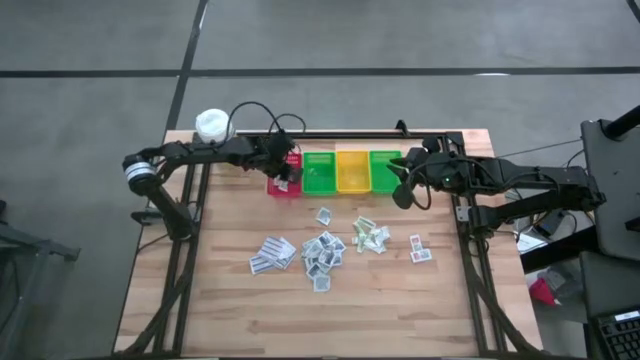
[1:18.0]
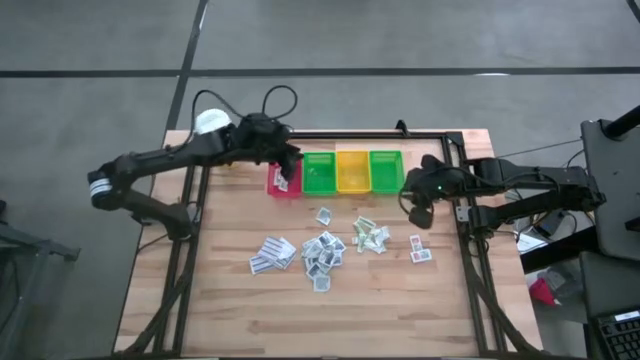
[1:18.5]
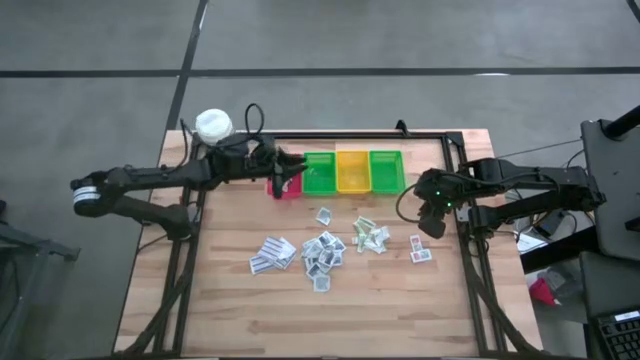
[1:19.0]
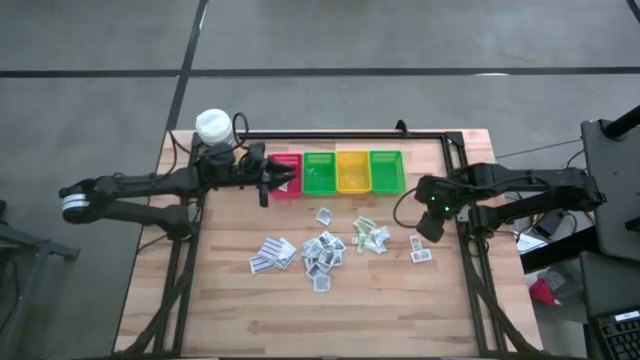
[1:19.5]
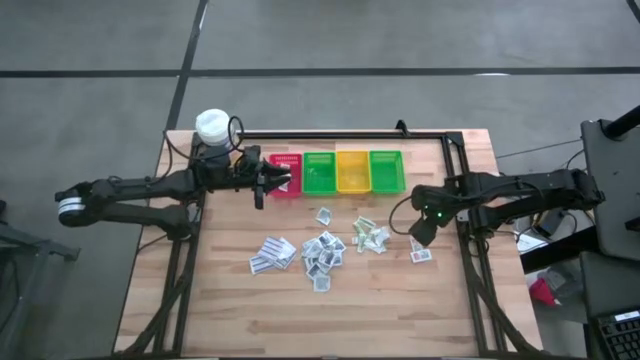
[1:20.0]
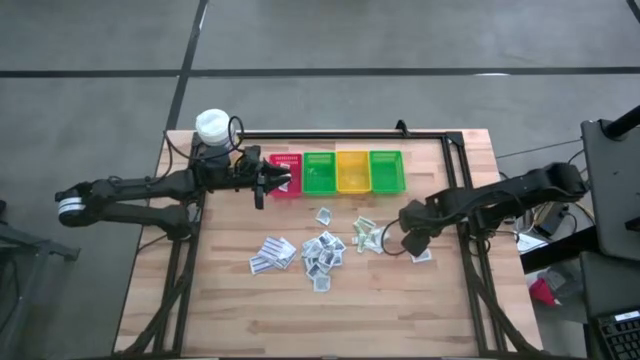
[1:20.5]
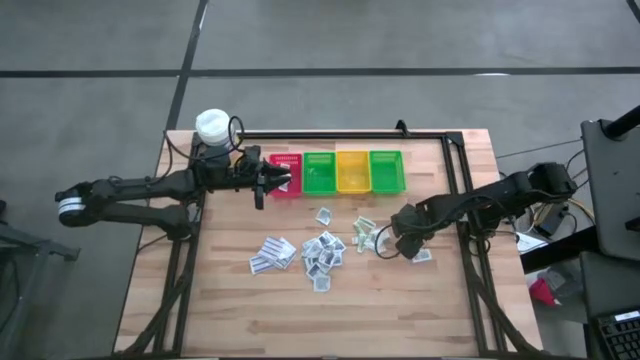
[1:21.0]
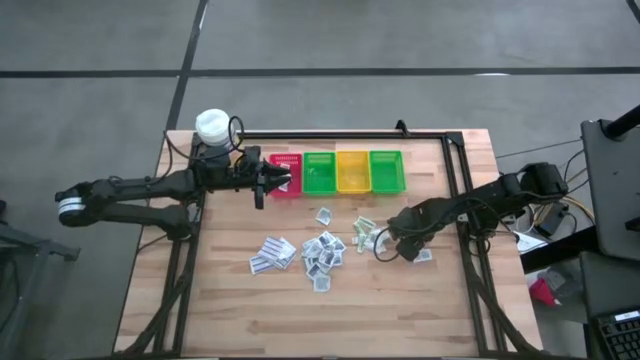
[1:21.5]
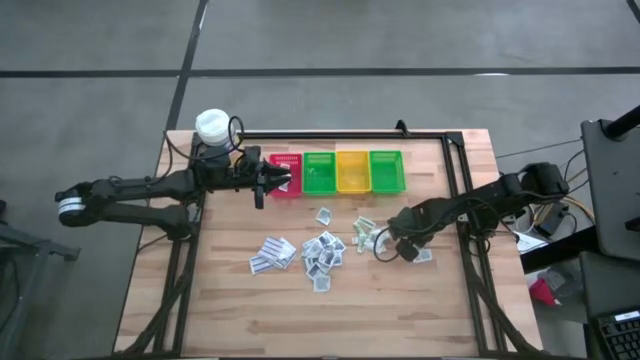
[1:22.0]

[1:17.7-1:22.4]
Task: Pick & Place First Aid Supplies
Put the ointment pack into the red bin

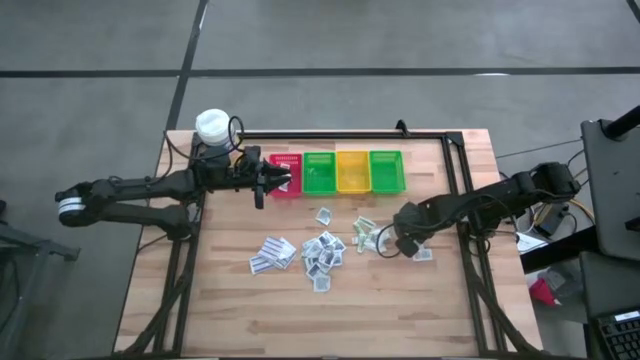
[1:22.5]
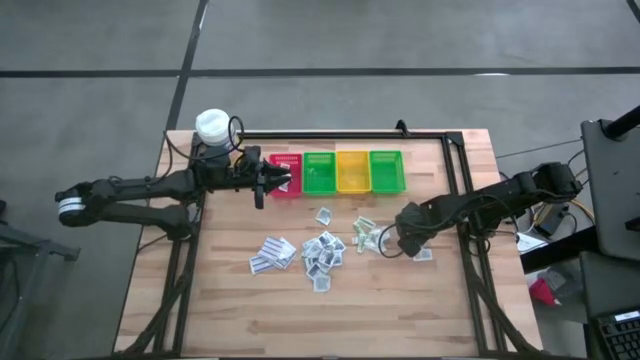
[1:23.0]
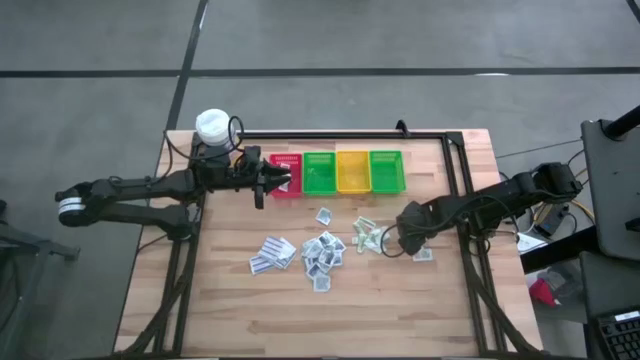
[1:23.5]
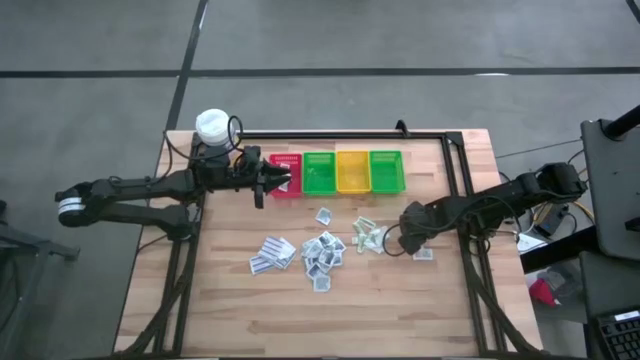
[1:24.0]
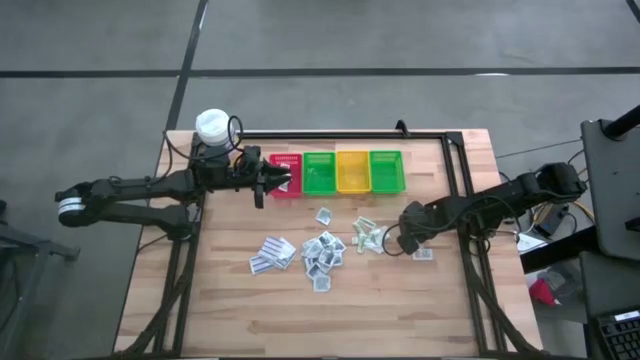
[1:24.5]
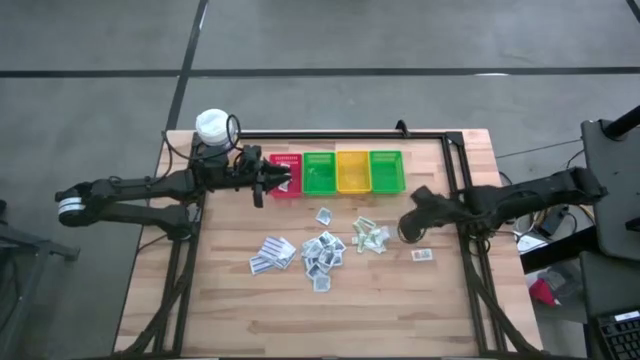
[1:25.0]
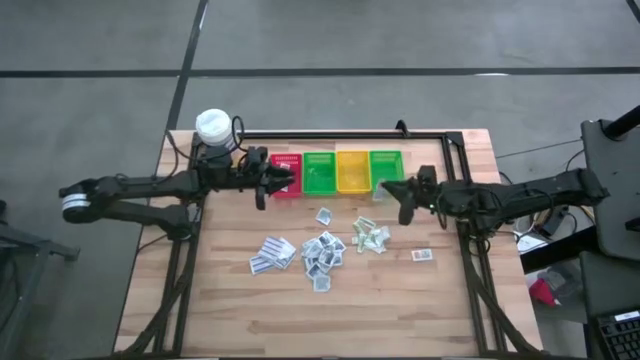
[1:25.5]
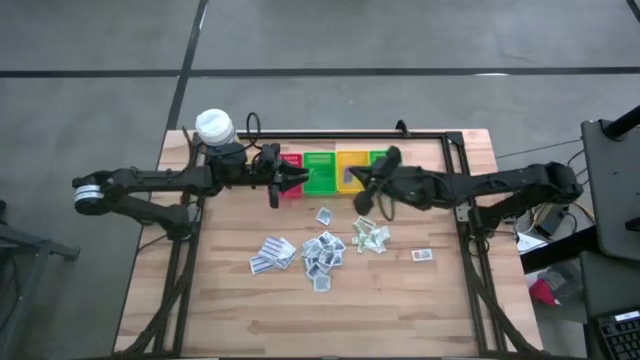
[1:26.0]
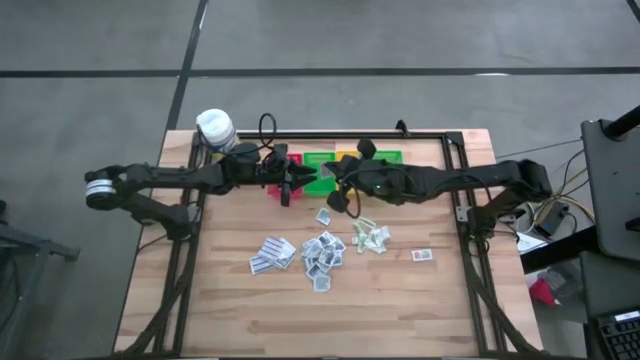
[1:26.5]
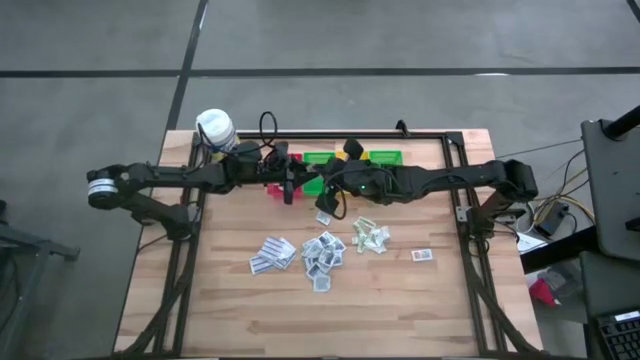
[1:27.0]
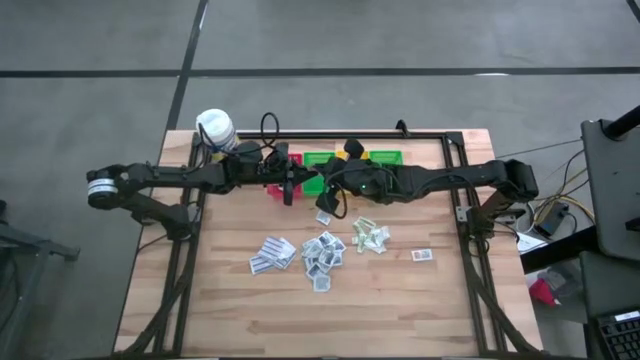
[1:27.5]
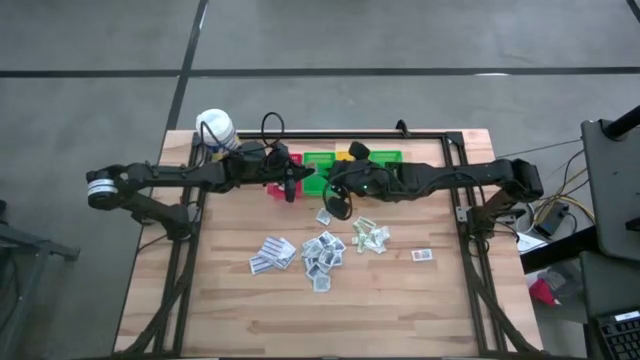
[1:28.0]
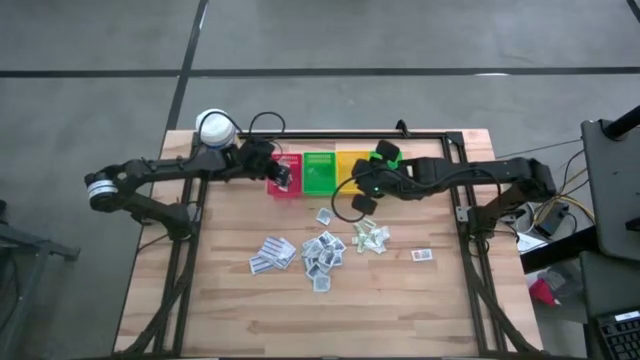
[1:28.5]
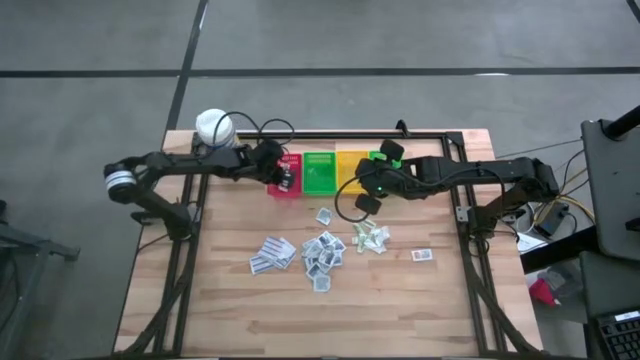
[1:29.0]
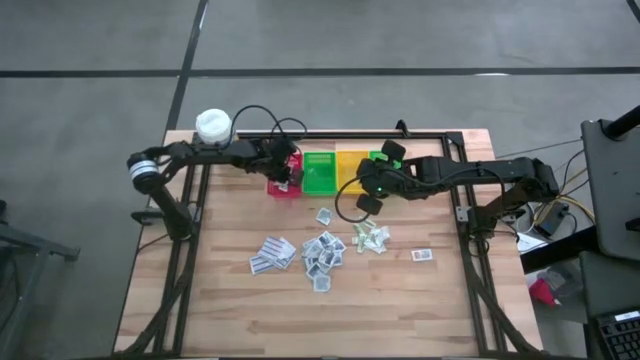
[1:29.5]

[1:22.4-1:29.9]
Put the ointment pack into the red bin

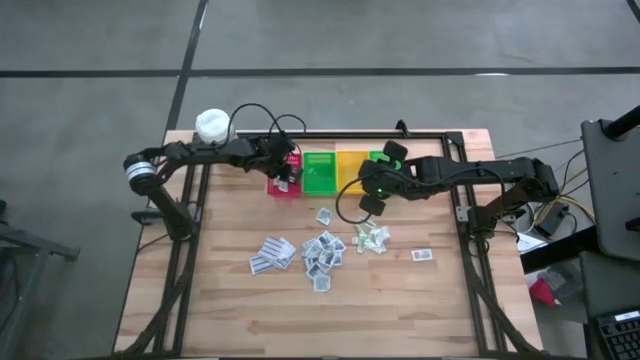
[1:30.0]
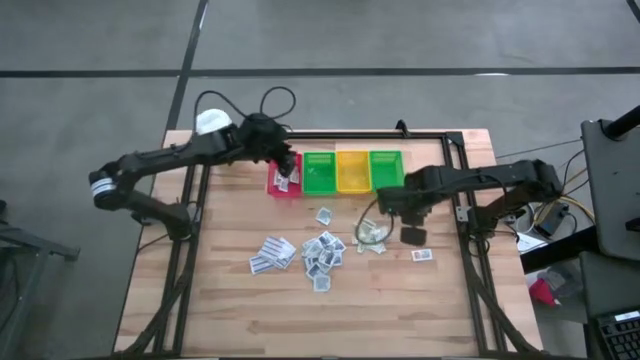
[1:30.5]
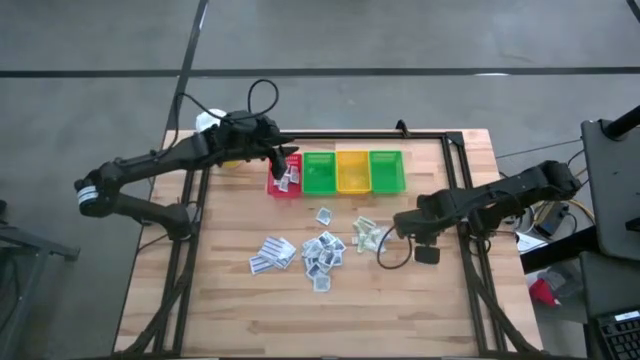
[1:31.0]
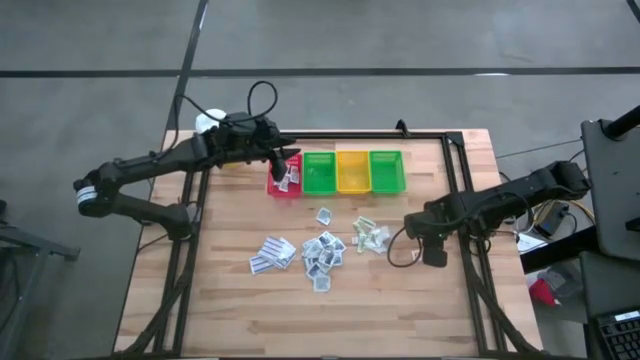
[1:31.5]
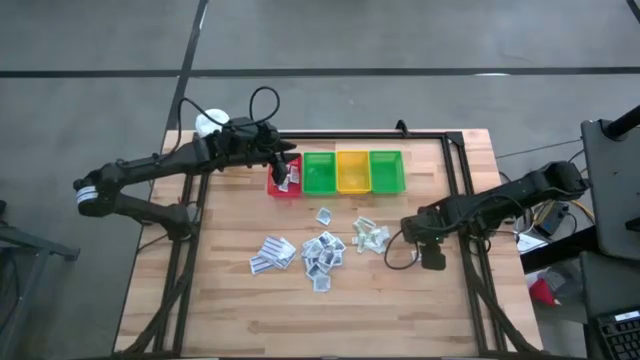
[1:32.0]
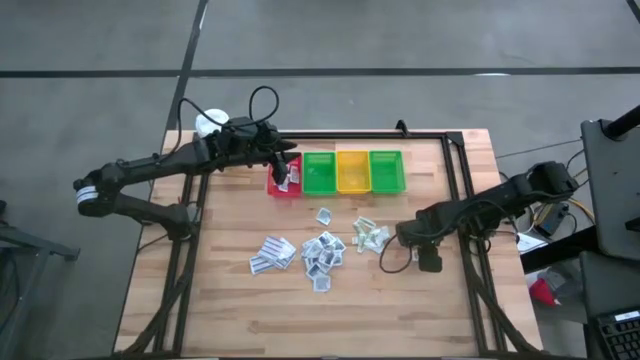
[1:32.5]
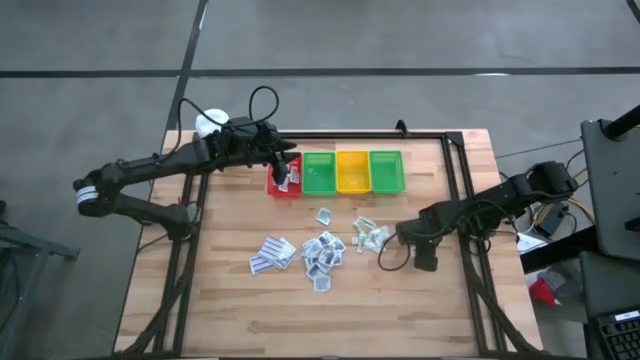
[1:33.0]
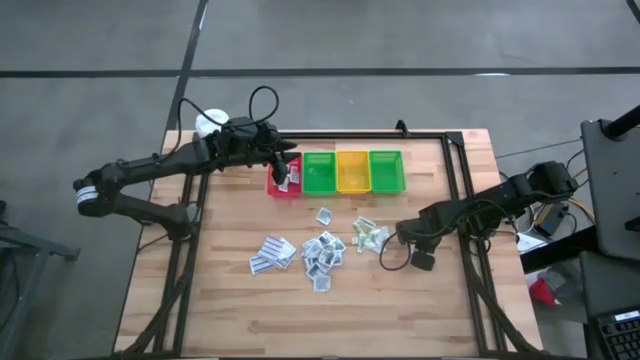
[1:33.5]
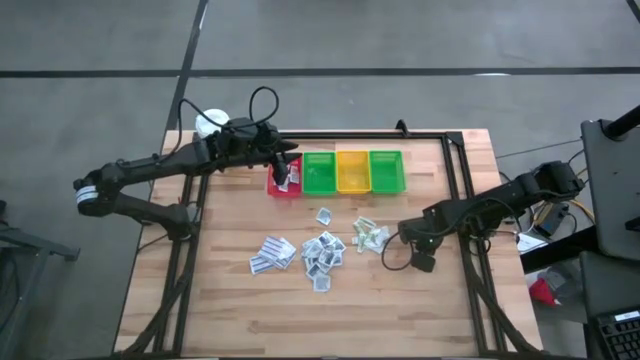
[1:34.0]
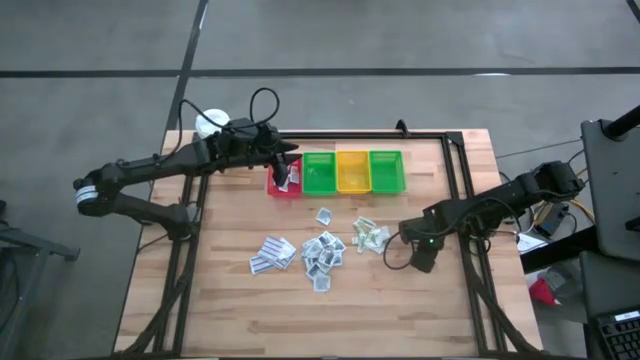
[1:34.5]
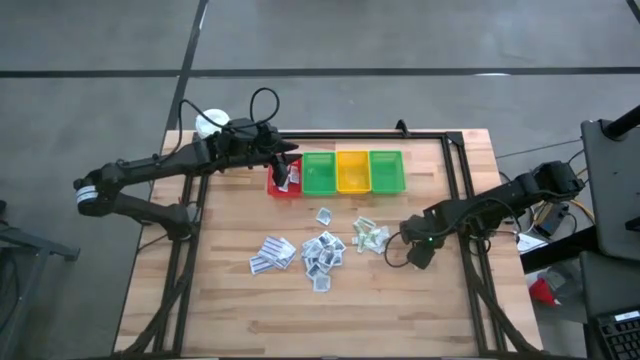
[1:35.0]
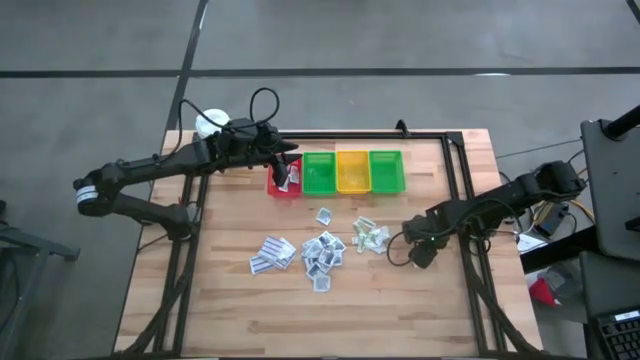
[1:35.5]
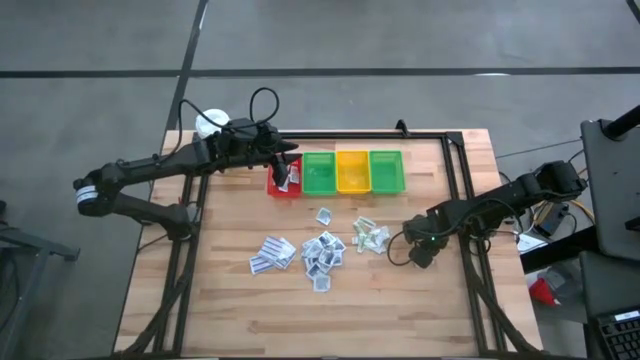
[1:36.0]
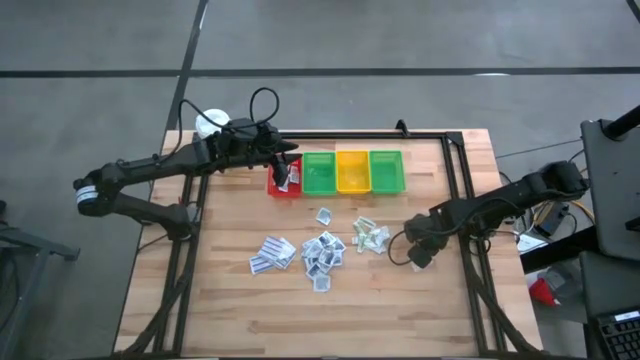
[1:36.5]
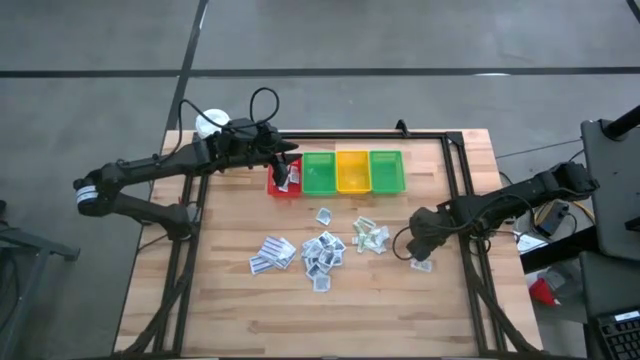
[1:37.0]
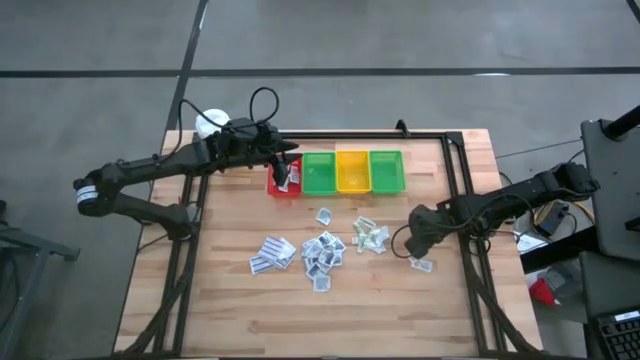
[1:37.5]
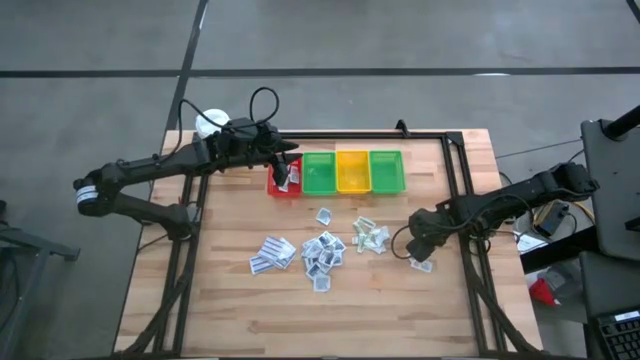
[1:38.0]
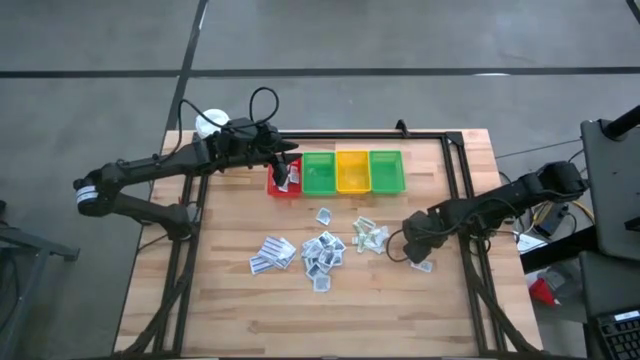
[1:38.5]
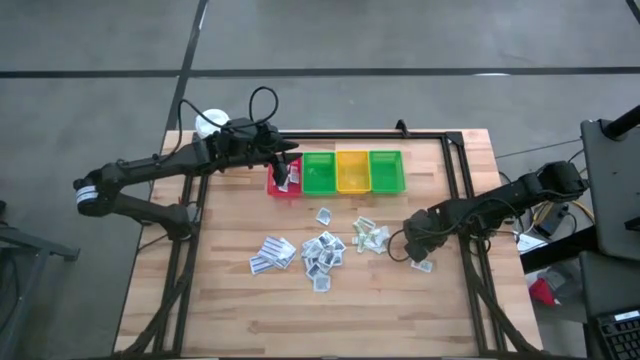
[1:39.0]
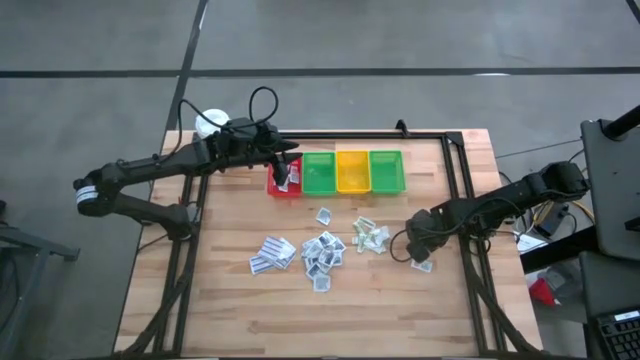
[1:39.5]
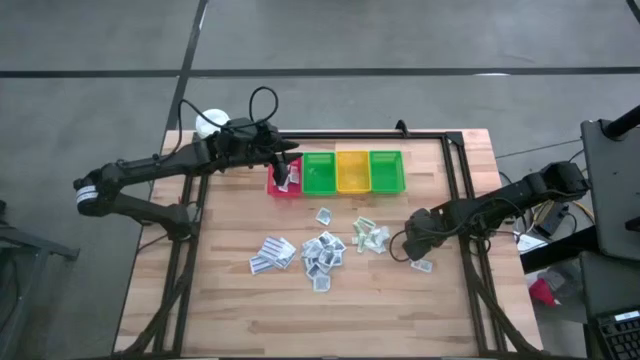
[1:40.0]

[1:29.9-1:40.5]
Put the ointment pack into the red bin
